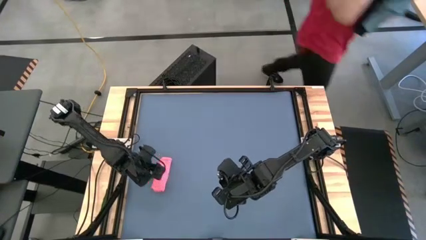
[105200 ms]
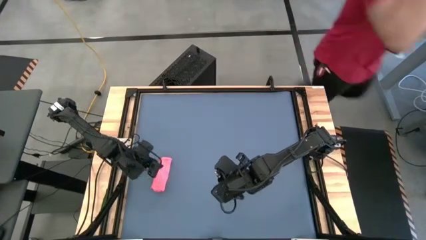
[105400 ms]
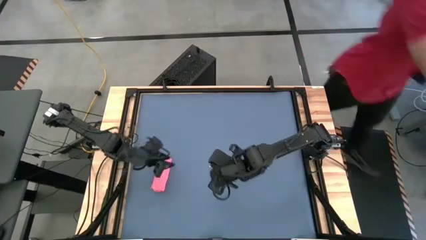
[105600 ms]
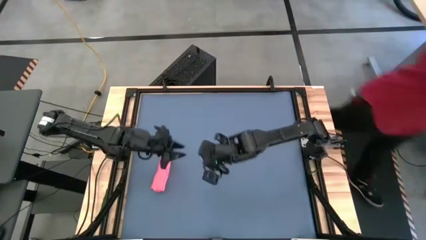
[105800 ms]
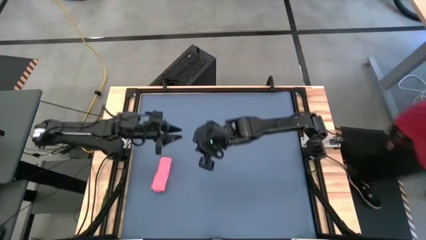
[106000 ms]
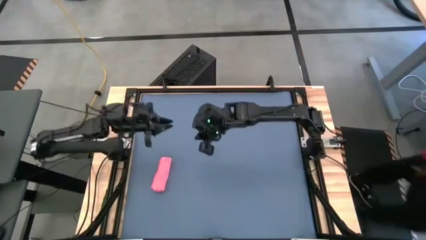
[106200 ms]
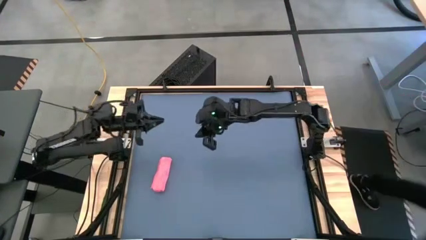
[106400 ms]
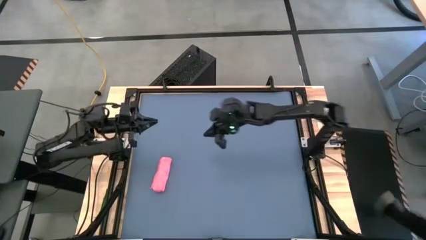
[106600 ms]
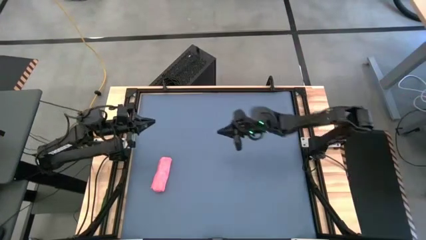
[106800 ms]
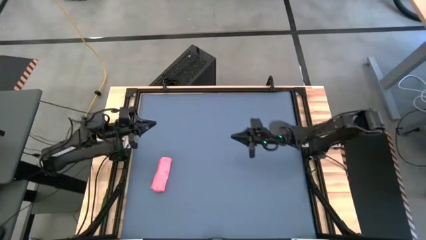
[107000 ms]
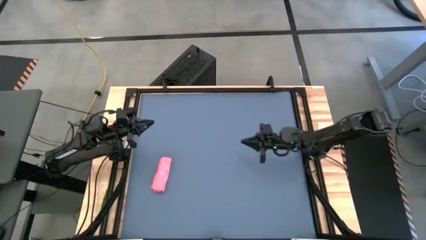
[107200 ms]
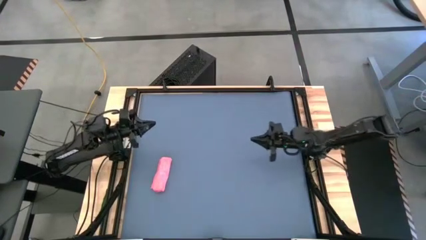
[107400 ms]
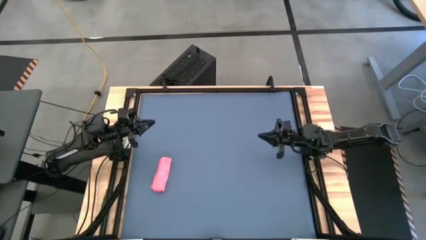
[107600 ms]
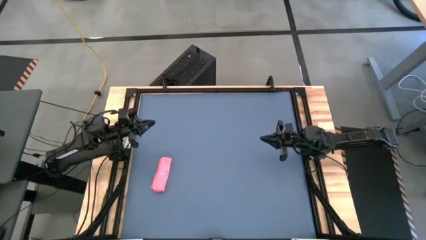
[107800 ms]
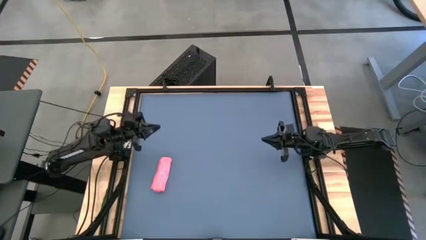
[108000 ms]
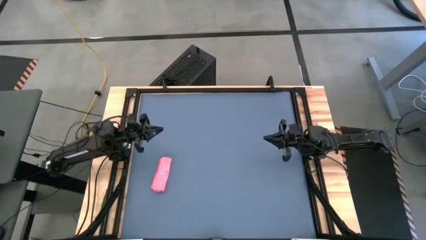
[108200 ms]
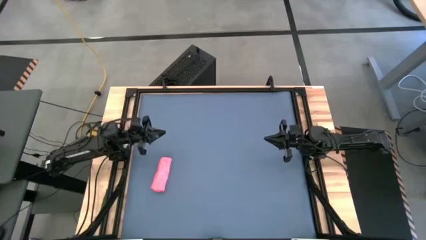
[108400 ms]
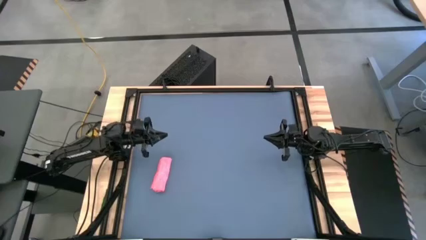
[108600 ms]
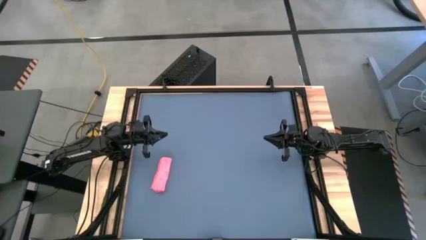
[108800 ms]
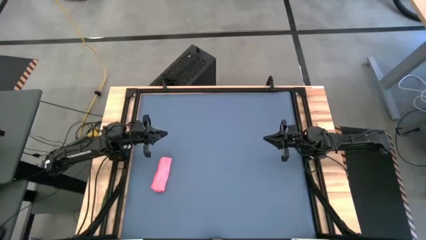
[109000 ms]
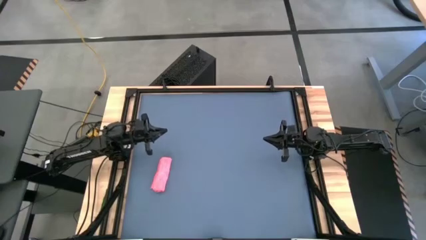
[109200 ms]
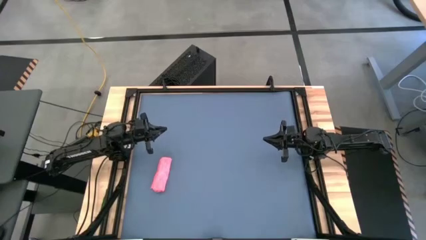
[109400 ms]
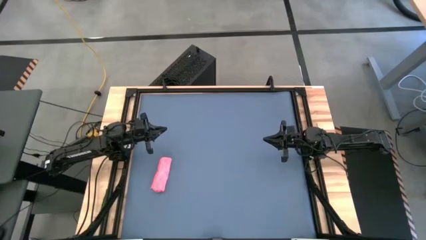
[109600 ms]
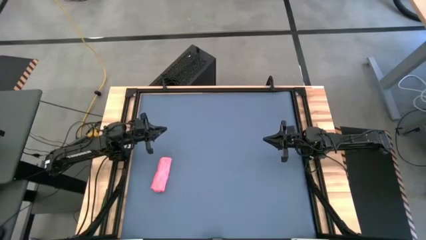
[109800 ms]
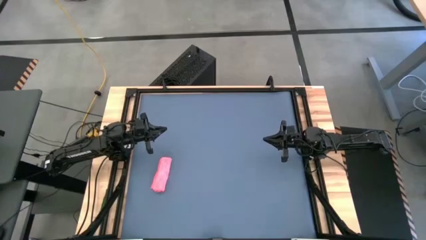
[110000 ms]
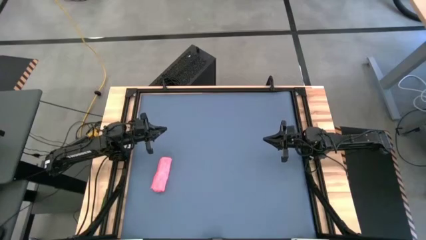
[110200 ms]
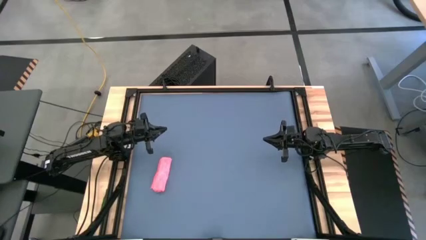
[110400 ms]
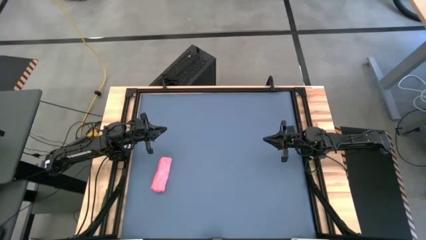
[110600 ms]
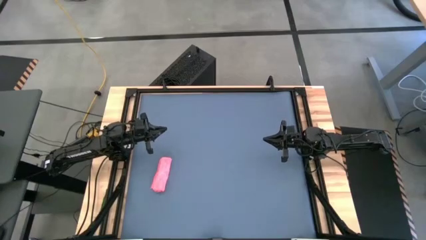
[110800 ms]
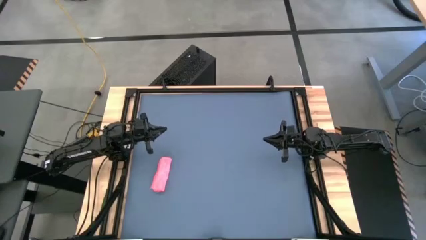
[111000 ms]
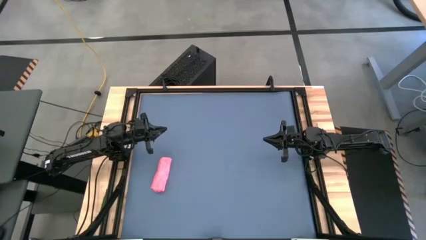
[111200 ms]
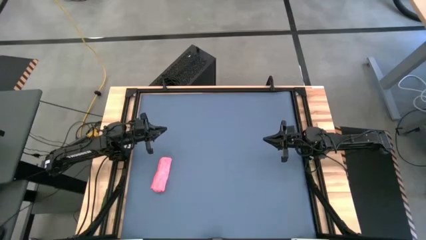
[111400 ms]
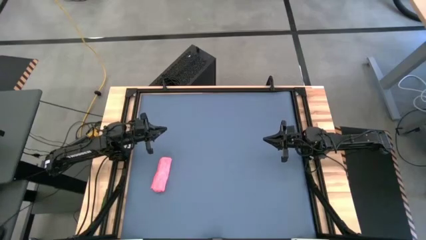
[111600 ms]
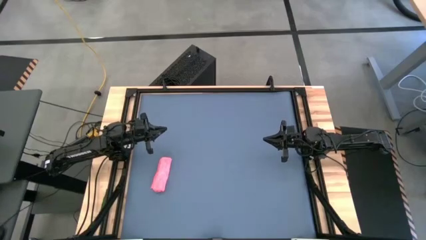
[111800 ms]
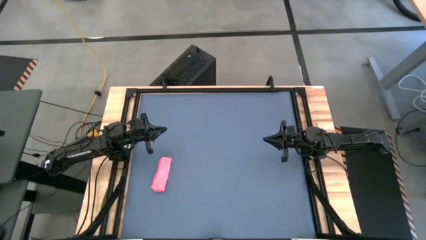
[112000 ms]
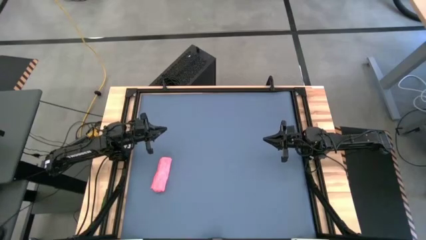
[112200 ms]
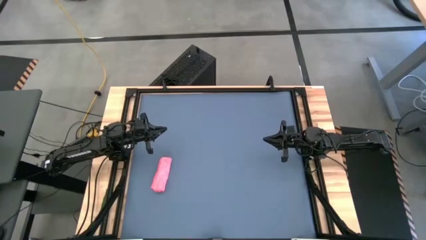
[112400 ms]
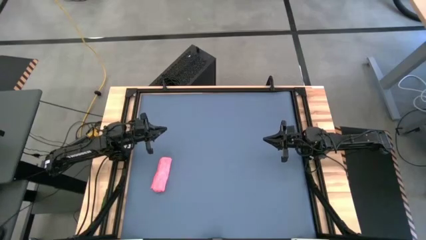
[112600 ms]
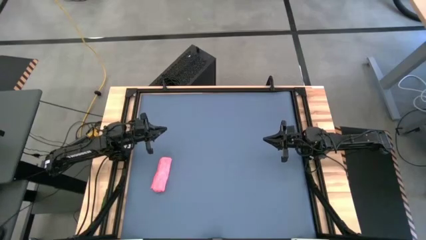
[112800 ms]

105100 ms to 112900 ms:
Task: Roll towel
Return to Home Position

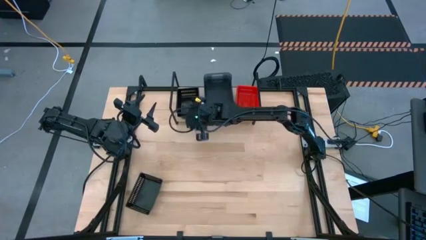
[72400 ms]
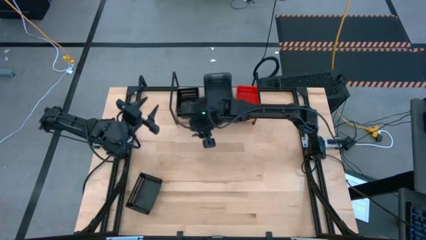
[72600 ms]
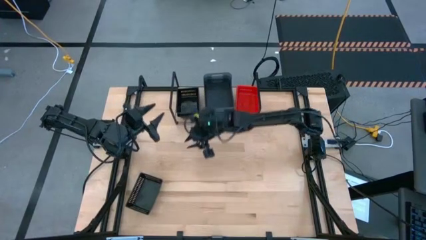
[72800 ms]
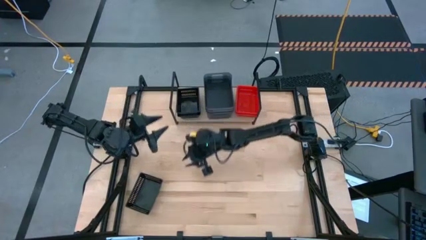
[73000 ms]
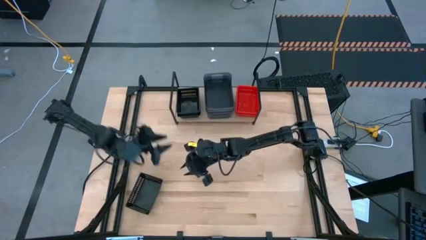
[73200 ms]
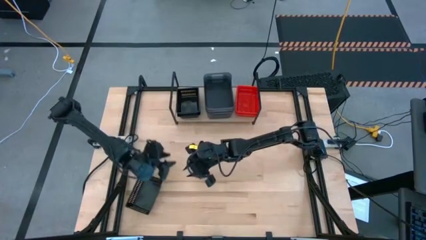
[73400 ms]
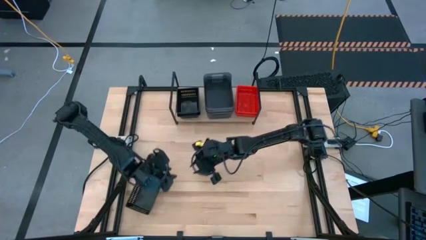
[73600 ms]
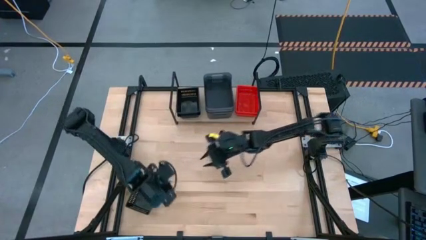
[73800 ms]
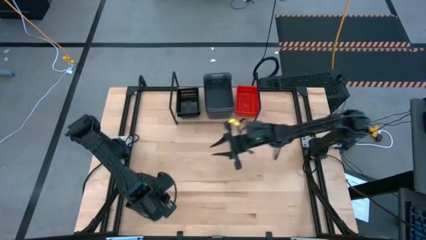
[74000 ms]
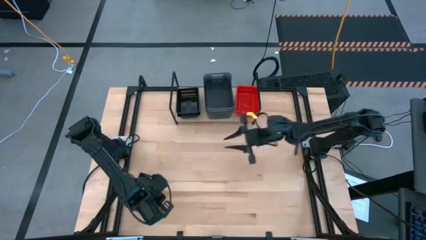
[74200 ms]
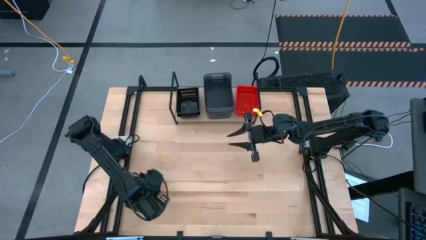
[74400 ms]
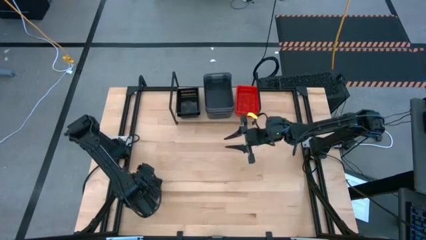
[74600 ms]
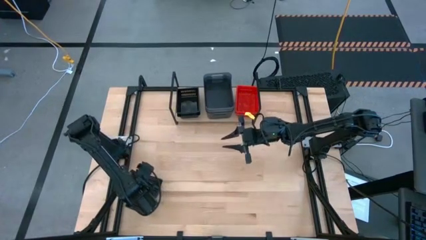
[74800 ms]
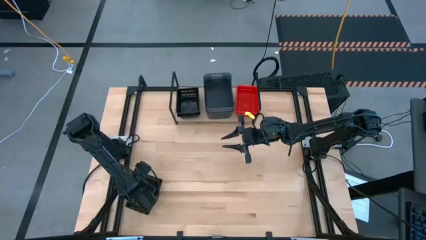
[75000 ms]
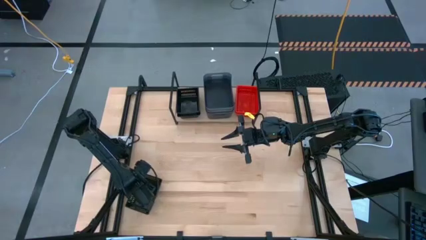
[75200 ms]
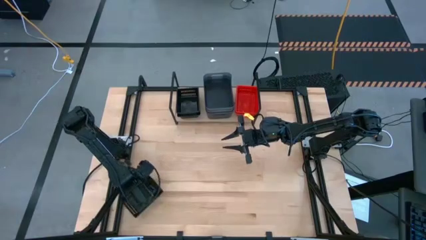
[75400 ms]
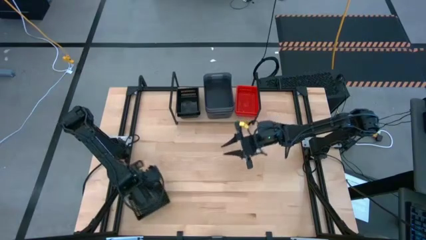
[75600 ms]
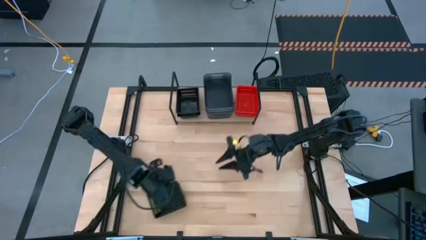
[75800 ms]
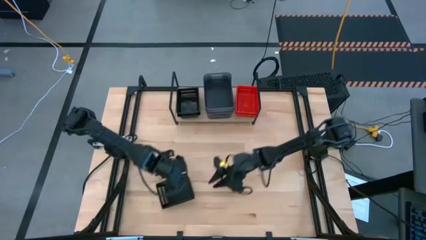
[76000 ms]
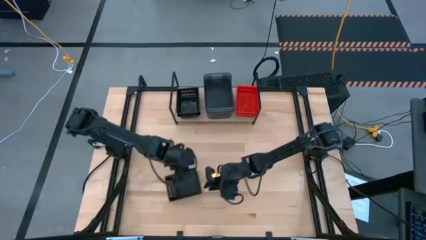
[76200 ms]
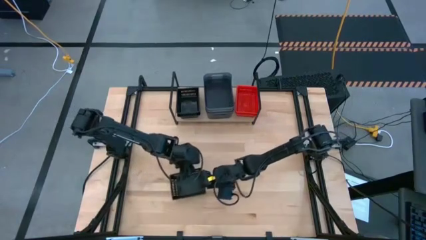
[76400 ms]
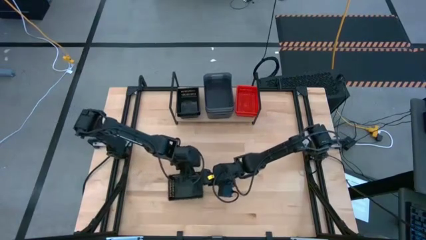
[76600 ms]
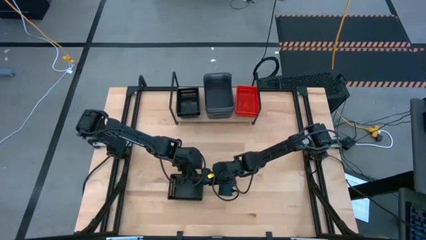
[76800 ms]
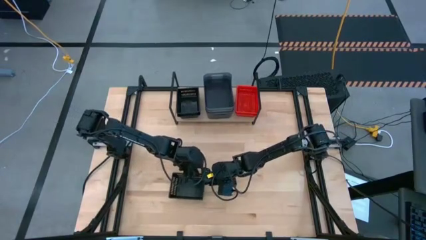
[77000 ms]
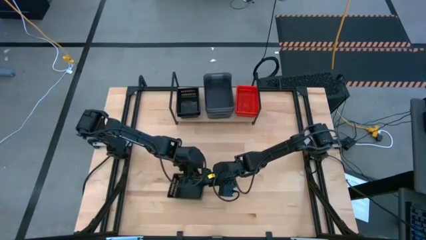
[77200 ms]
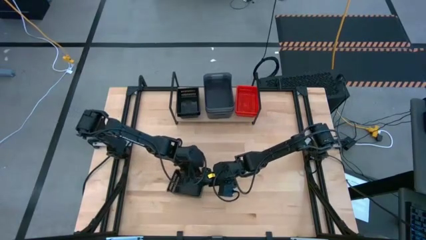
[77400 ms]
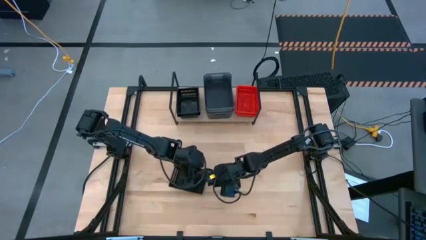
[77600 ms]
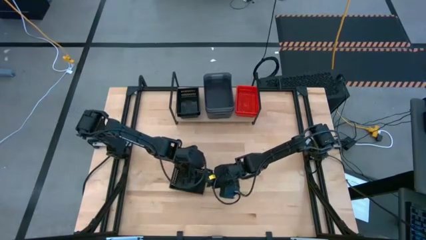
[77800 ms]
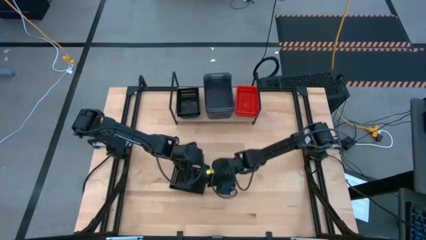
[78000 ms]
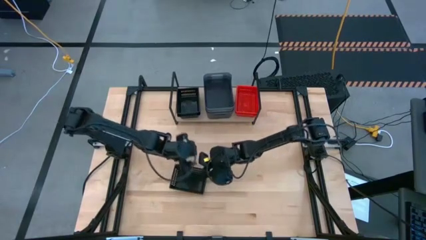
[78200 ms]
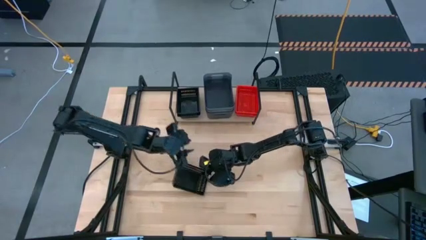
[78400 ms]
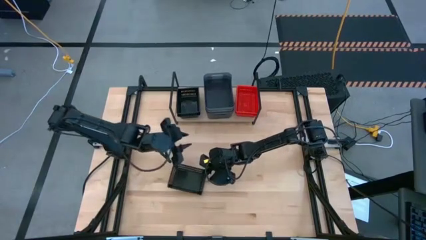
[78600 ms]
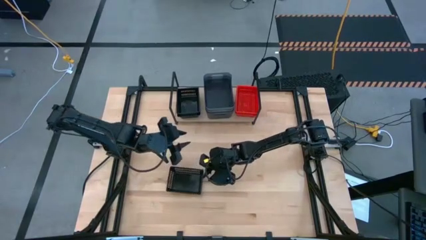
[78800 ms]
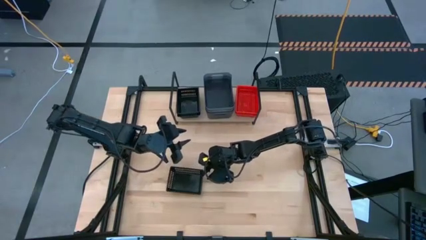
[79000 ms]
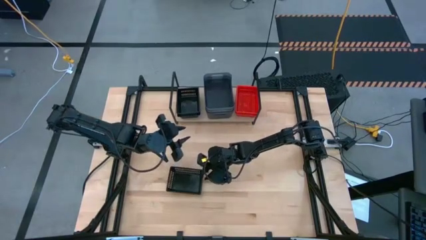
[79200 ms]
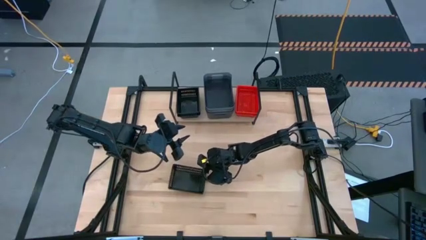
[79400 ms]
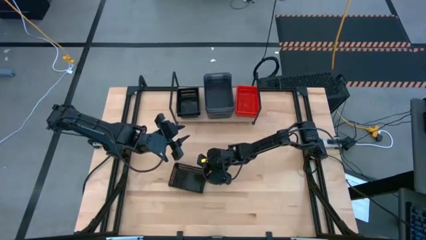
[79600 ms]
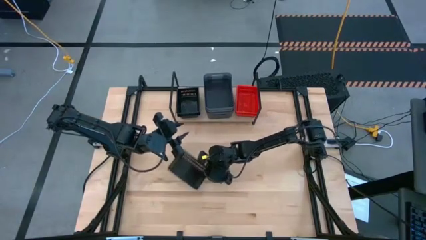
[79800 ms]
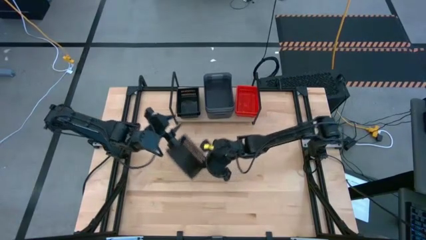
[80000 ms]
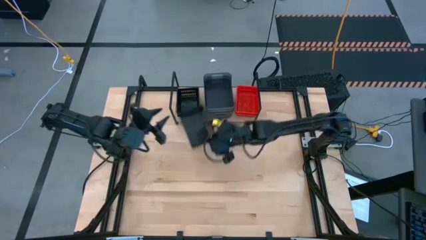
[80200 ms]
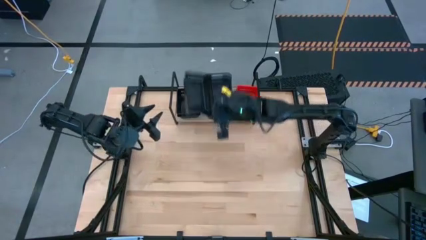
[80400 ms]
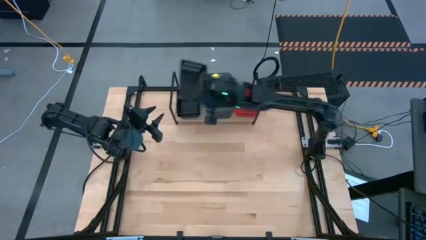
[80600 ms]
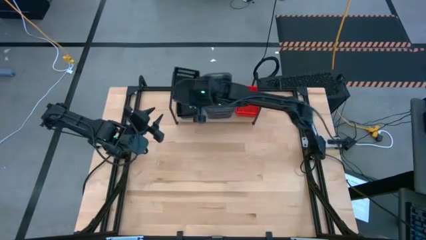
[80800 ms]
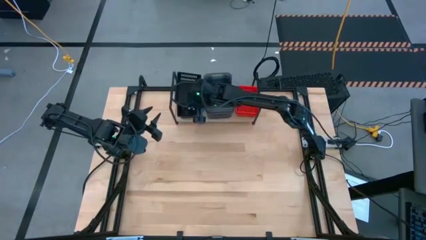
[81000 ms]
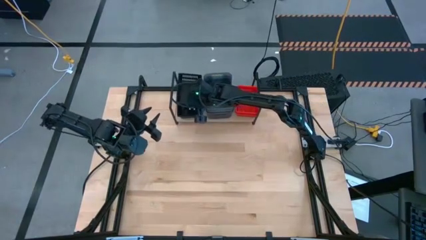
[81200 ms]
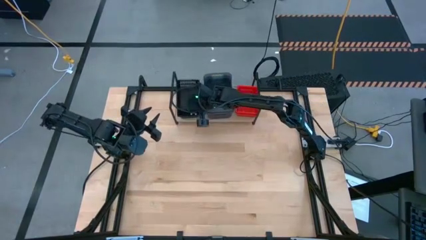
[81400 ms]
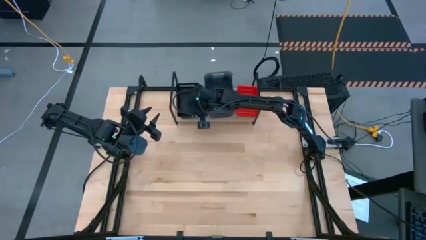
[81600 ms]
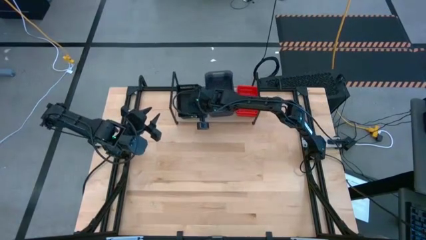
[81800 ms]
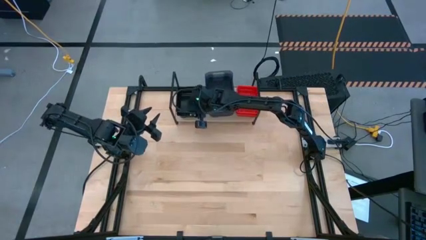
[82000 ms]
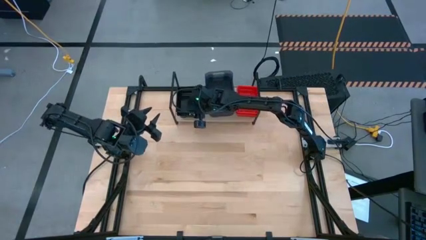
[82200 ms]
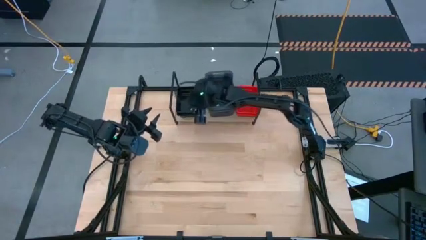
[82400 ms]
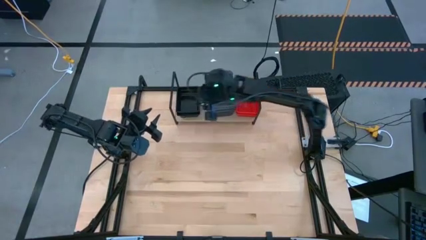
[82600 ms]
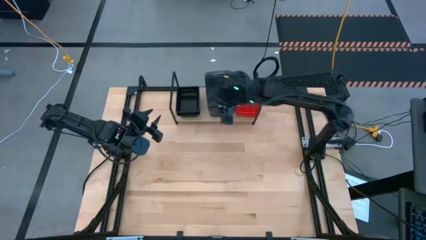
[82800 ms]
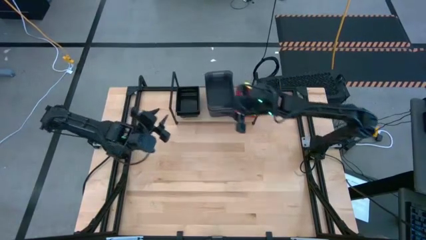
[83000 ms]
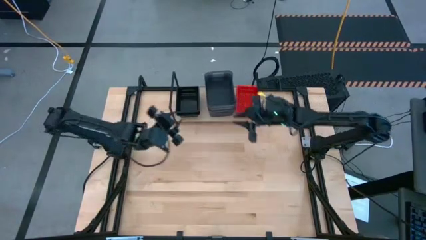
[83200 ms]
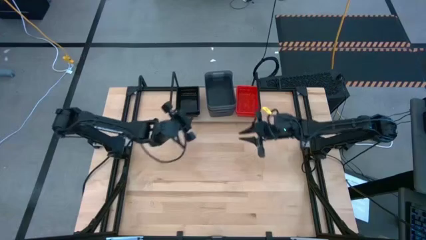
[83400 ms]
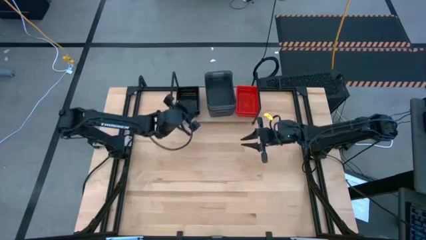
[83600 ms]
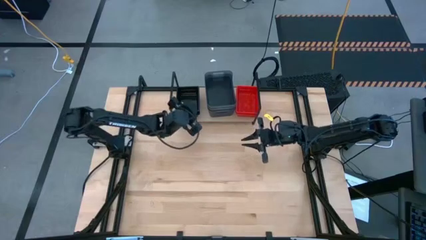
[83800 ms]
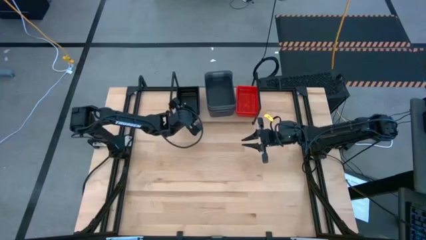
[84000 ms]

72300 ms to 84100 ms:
Task: Stack baskets on shelf by color
Stack the black bin on top of the other black bins on the shelf
